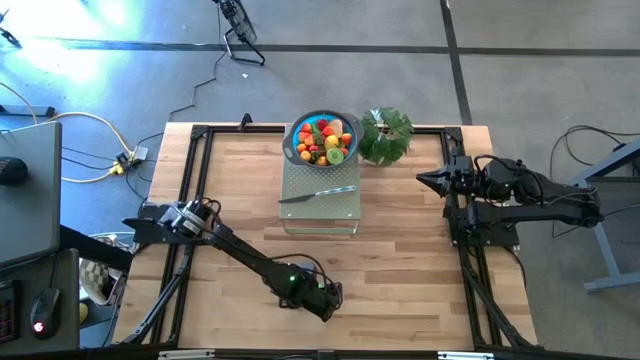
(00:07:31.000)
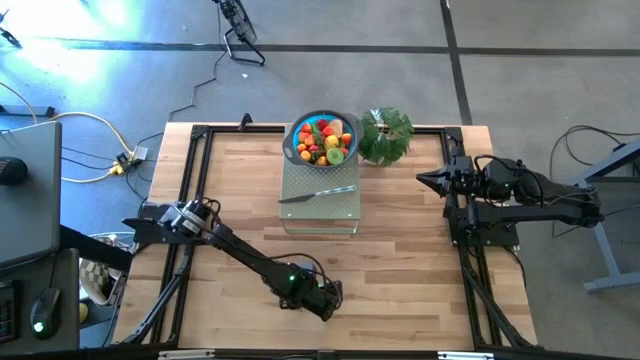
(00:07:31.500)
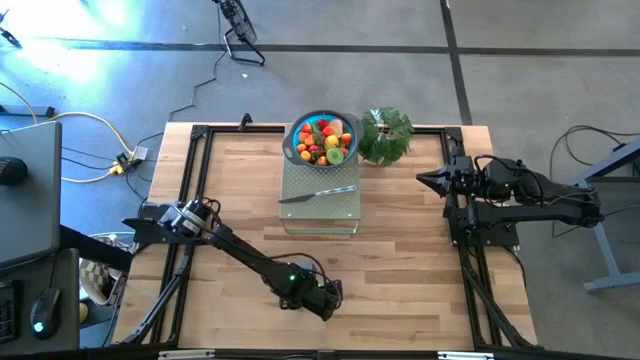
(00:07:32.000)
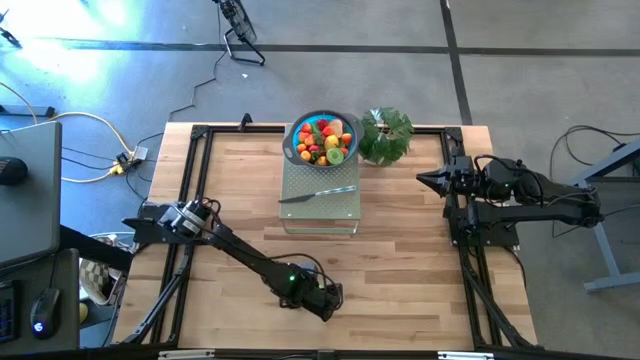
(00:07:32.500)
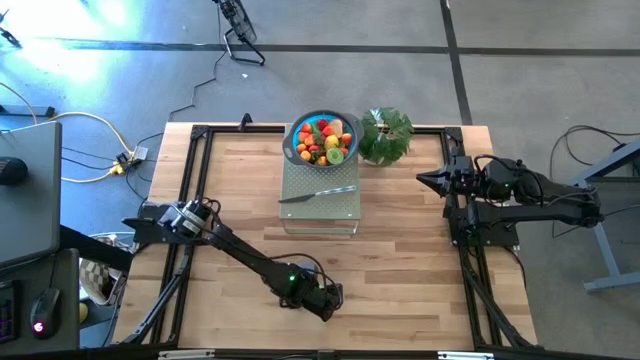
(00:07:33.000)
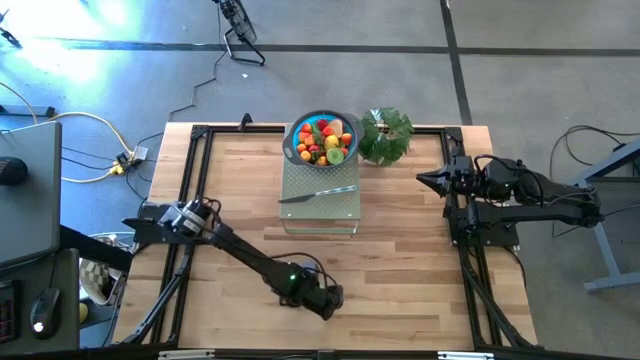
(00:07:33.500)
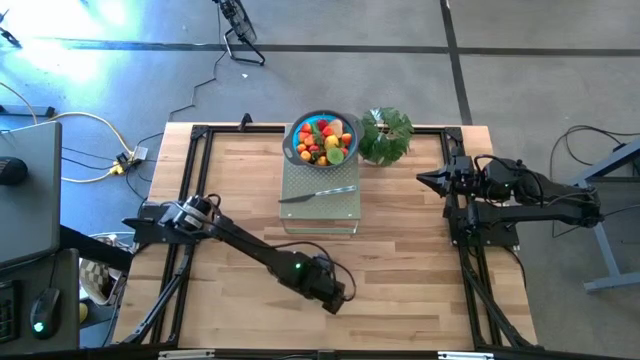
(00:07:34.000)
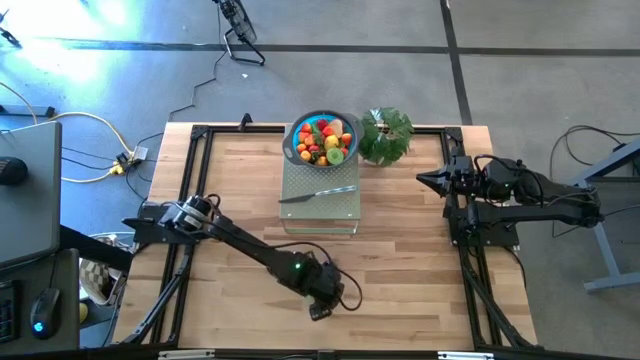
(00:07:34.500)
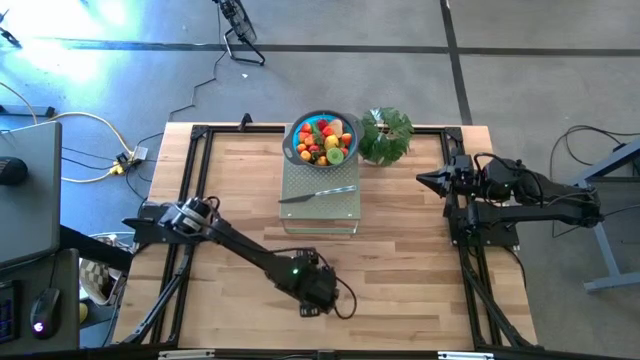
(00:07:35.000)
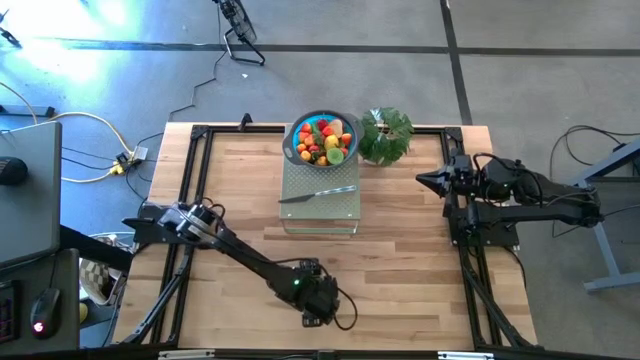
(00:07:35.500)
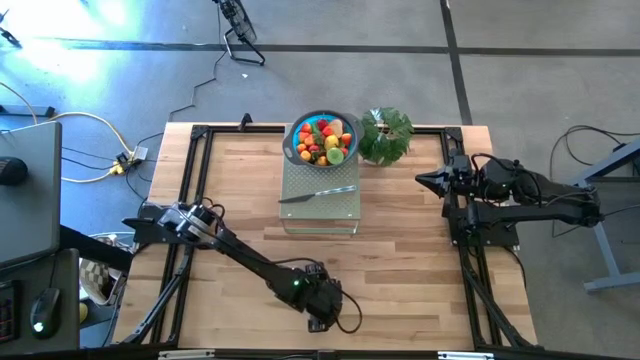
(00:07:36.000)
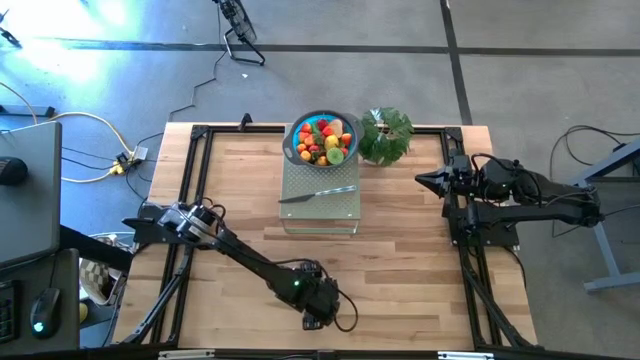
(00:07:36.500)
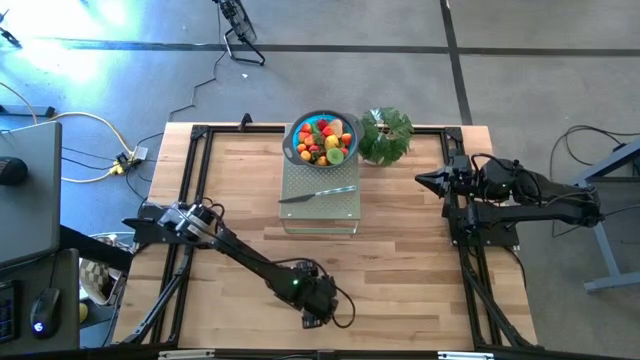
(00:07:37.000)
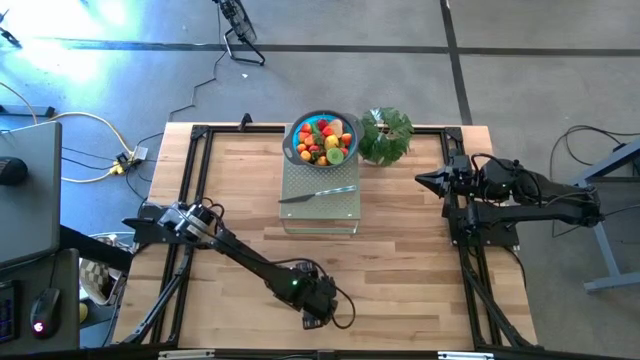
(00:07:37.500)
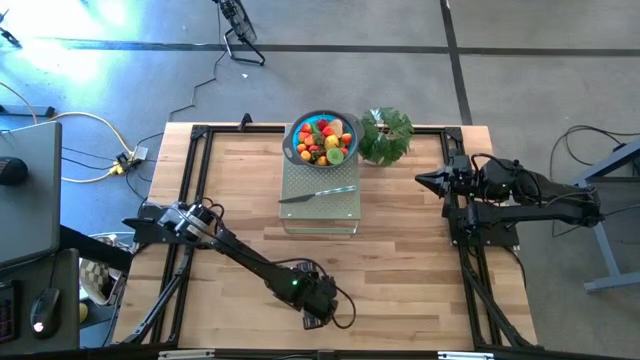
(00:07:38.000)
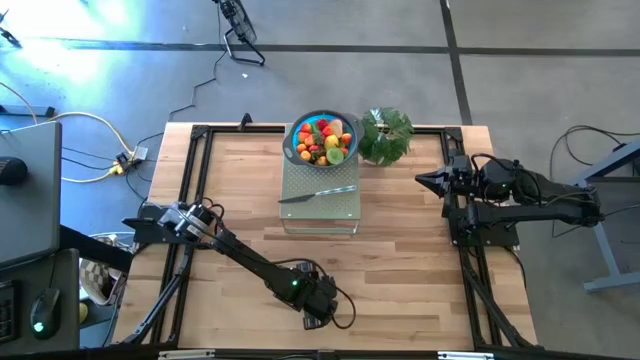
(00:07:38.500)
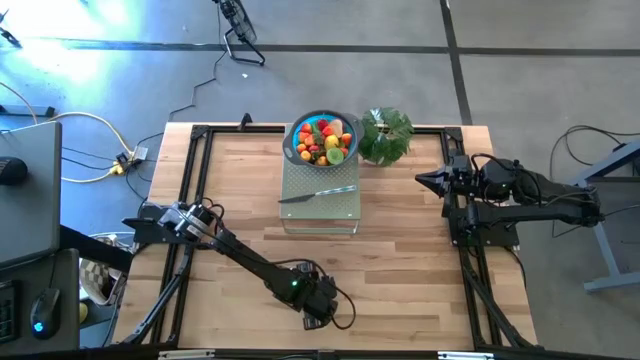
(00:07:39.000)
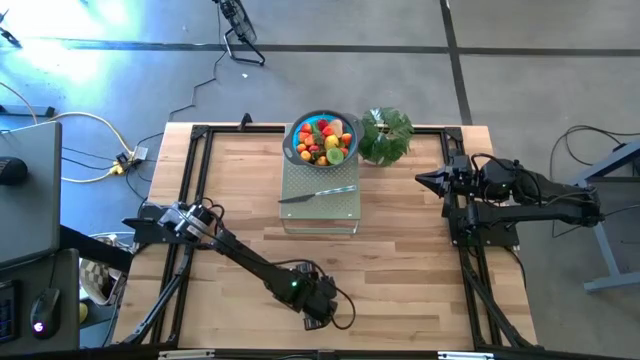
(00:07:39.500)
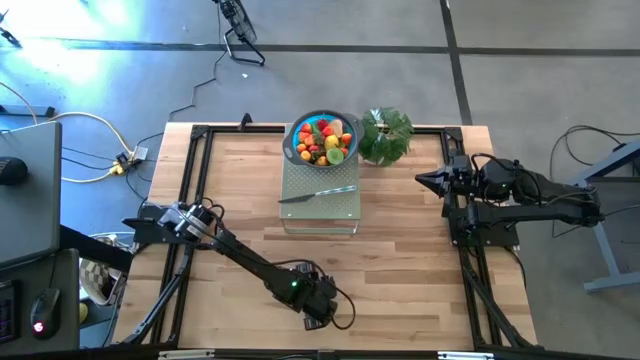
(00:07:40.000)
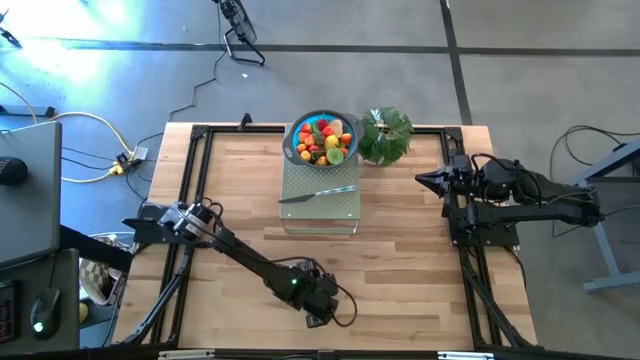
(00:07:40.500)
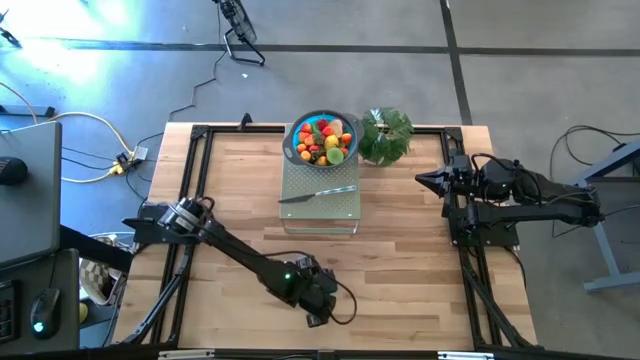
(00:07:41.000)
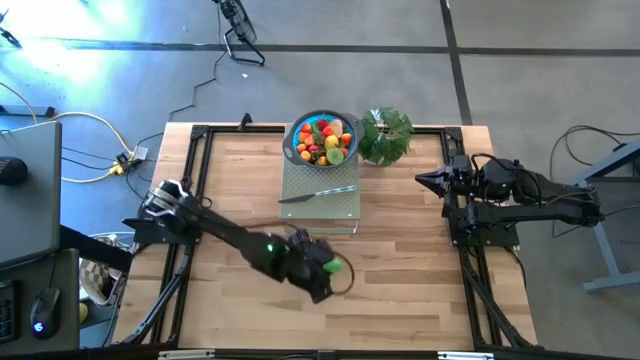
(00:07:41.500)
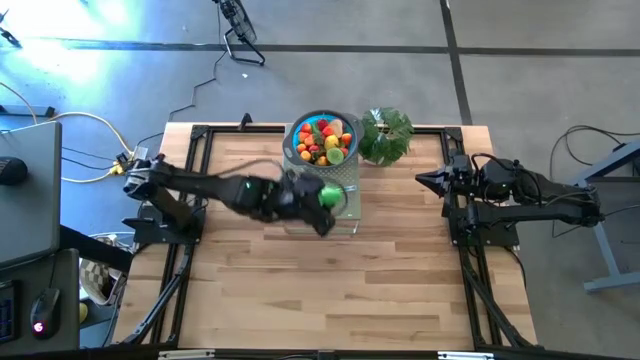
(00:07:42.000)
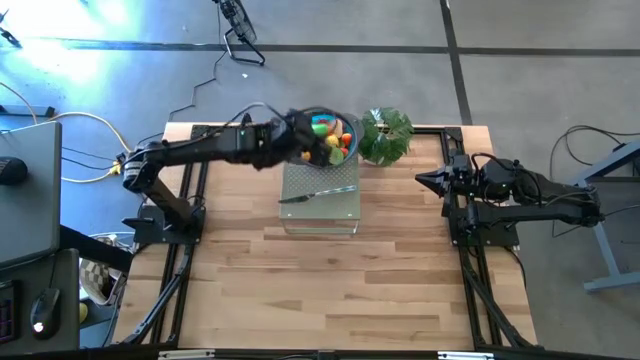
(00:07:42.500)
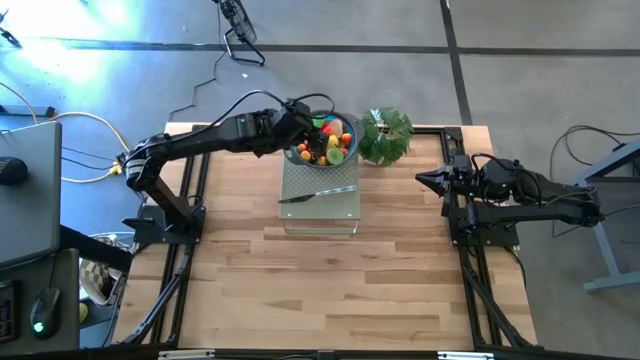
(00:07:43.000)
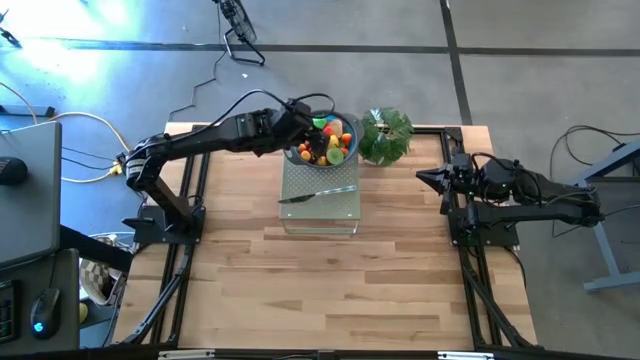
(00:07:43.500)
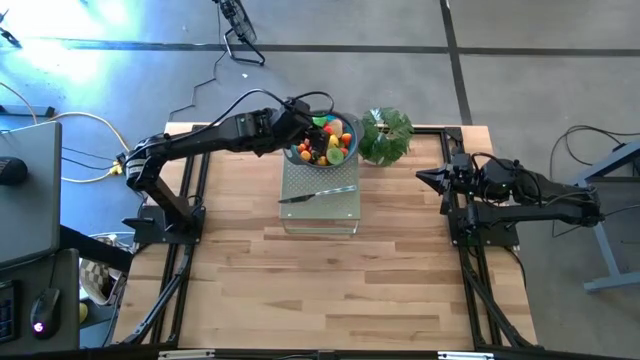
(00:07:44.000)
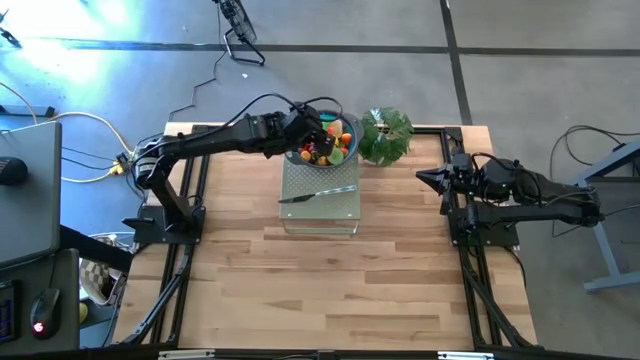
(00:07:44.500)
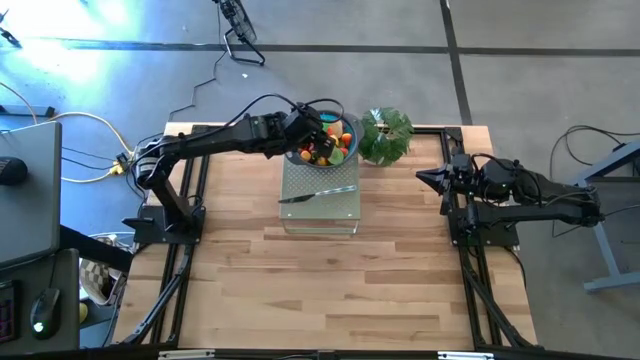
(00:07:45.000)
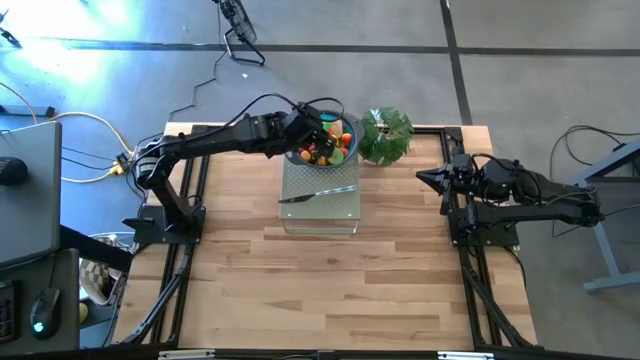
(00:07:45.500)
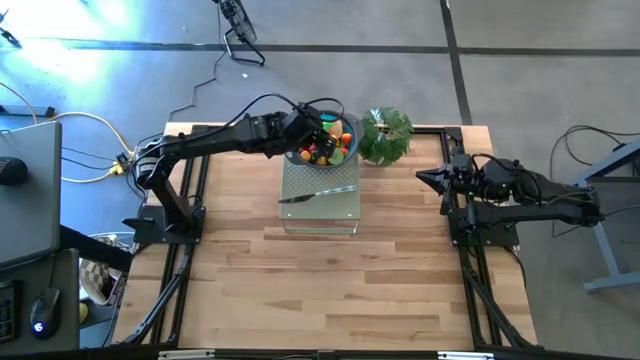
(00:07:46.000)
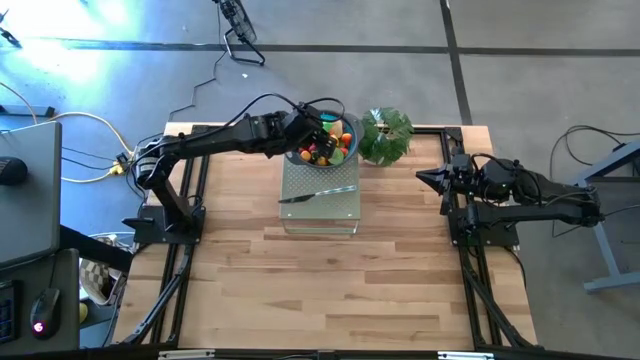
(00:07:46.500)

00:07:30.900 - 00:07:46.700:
Task: Pick & Place Fruit
Put the green pear in the blue bowl on the shelf

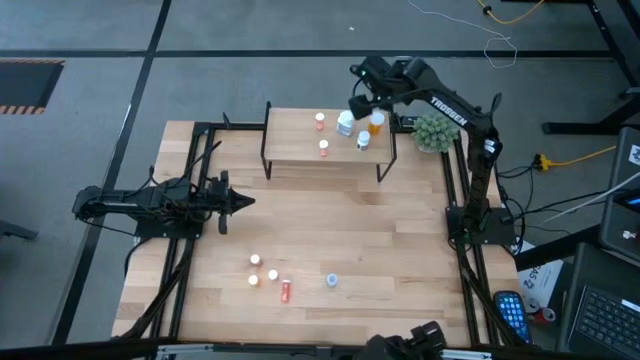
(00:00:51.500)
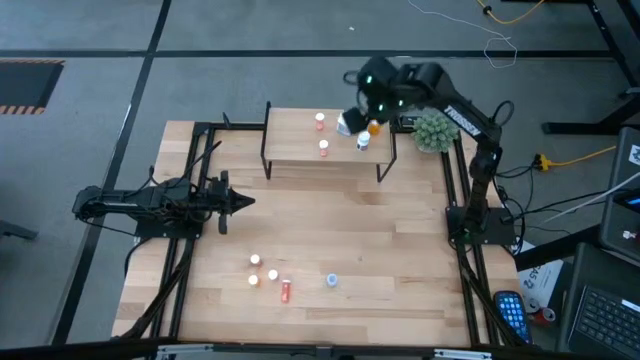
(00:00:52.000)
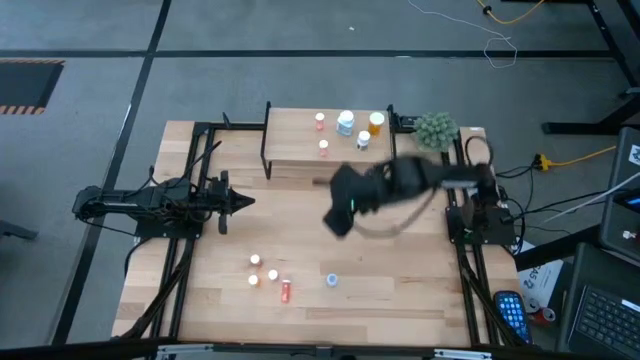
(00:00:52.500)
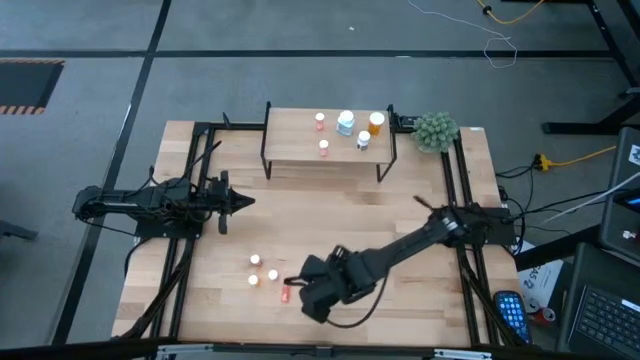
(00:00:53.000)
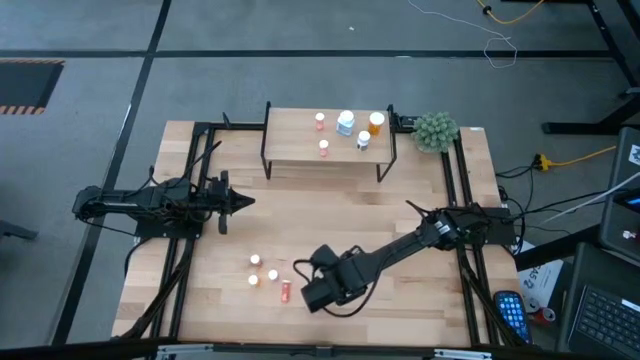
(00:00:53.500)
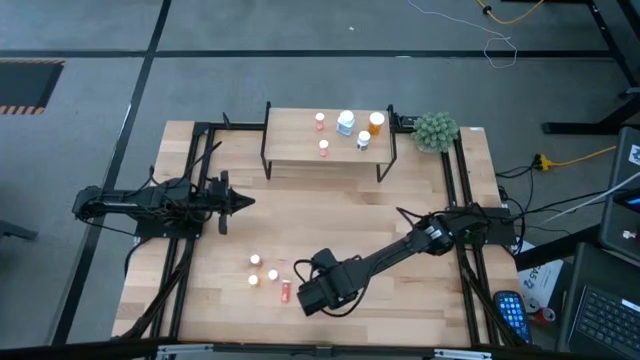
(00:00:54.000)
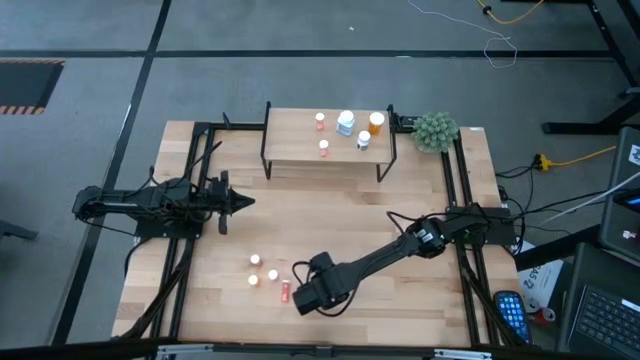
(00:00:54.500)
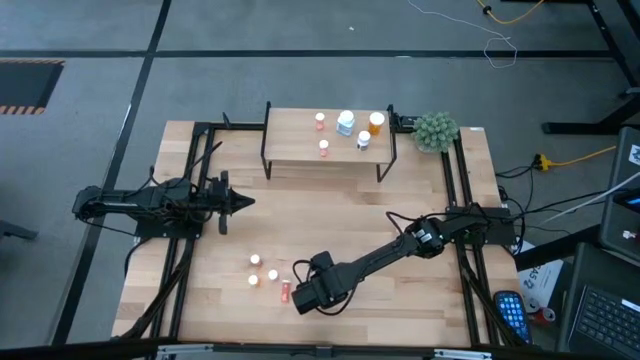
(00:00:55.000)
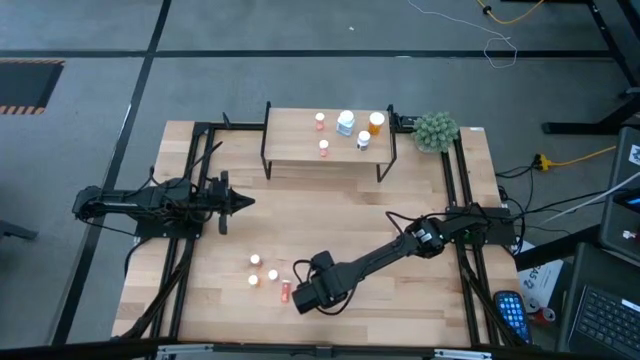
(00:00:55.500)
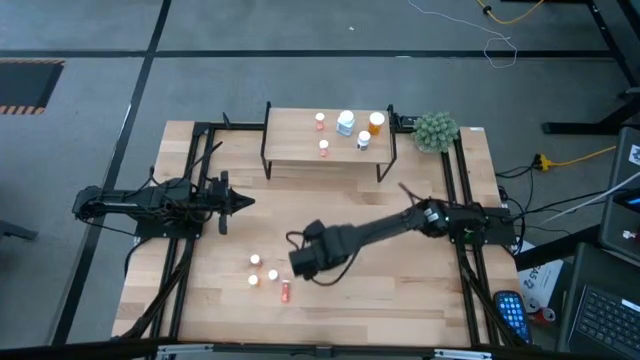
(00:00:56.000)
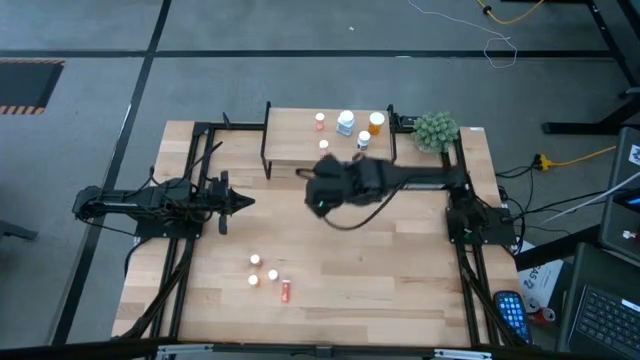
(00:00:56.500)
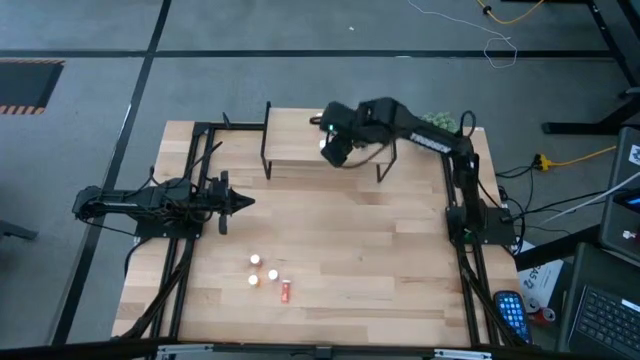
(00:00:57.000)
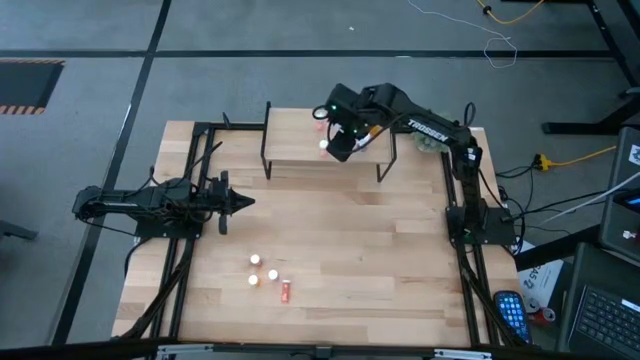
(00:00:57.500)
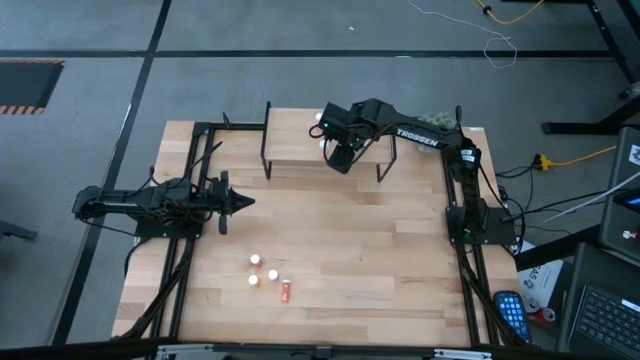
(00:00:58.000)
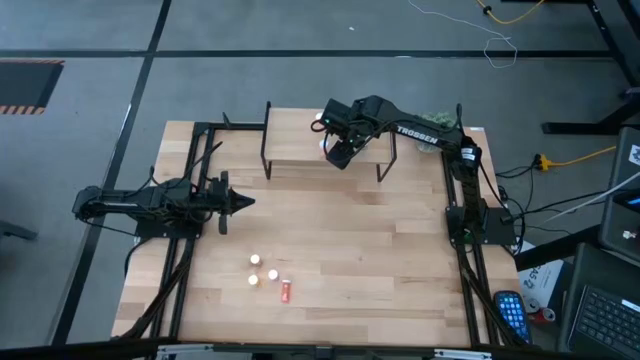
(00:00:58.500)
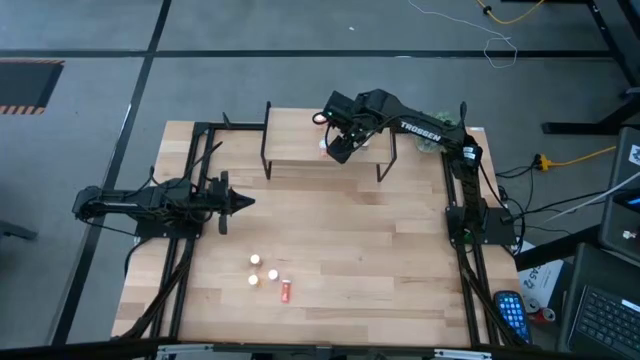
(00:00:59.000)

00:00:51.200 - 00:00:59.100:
Task: Pick and place medicine bottles onto shelf by color
Put the transparent pill bottle on the shelf
